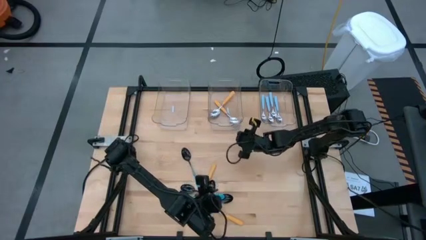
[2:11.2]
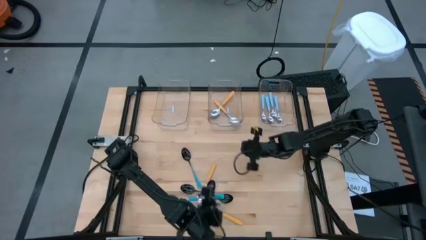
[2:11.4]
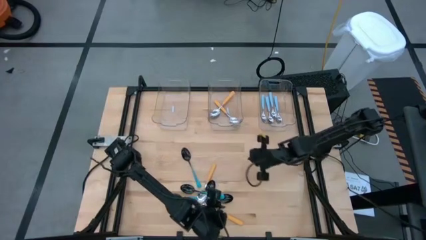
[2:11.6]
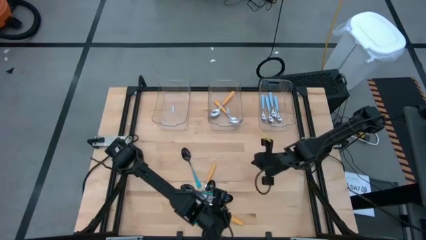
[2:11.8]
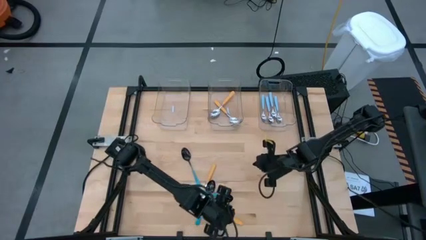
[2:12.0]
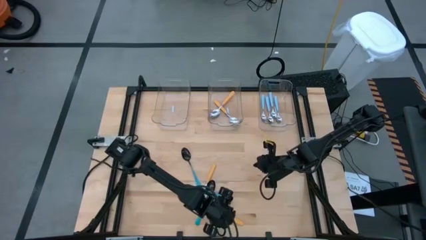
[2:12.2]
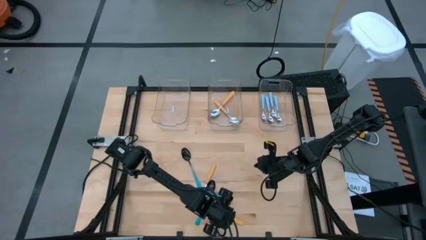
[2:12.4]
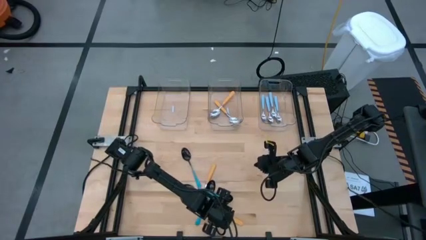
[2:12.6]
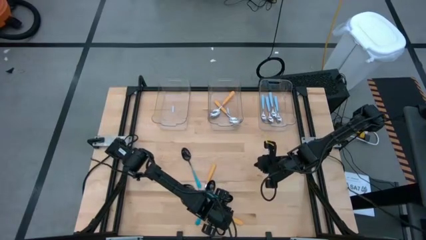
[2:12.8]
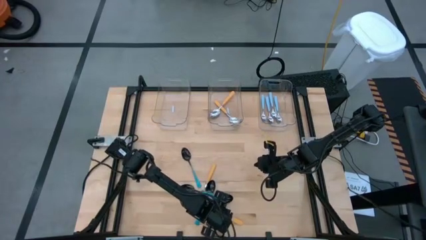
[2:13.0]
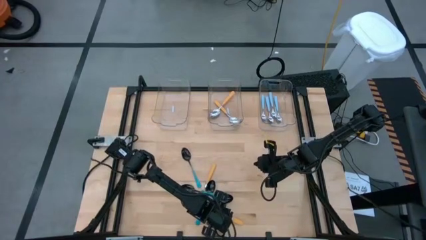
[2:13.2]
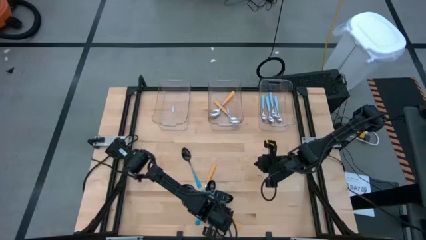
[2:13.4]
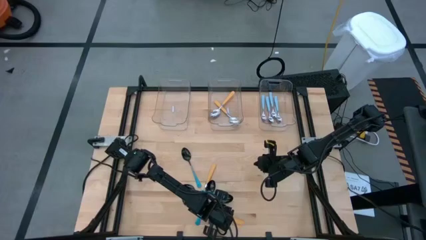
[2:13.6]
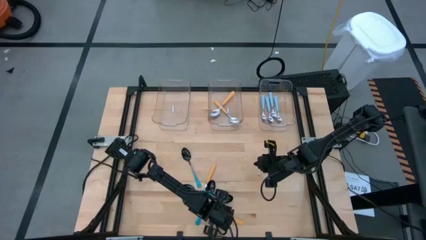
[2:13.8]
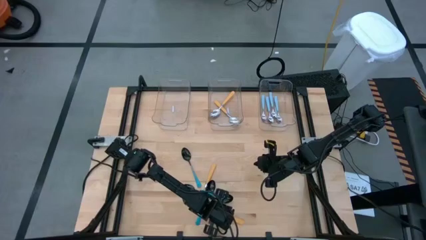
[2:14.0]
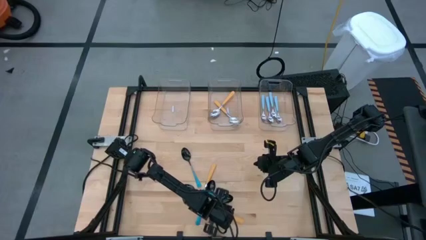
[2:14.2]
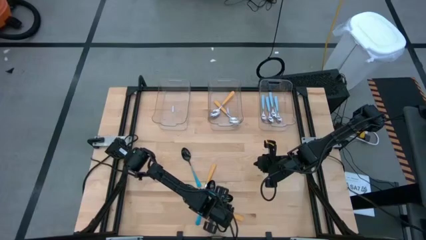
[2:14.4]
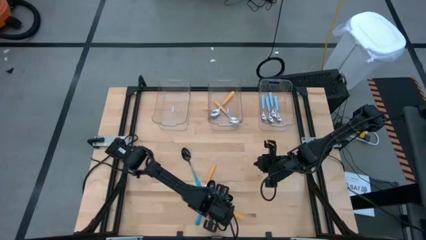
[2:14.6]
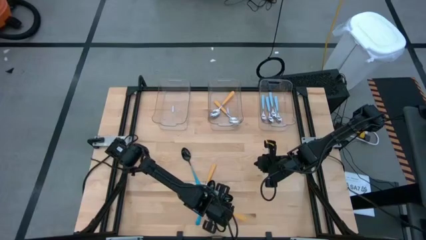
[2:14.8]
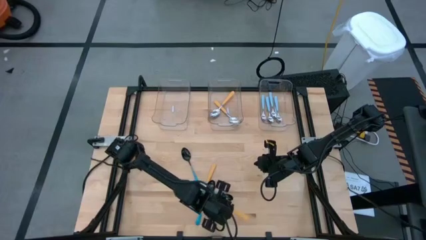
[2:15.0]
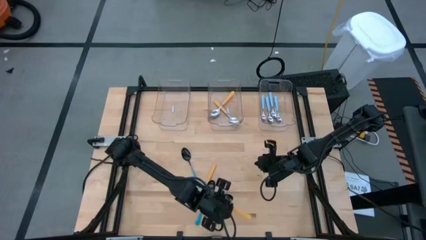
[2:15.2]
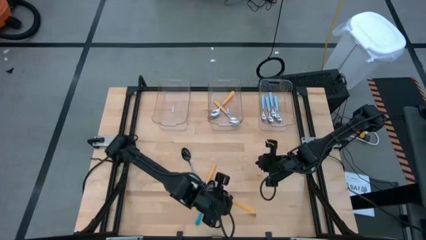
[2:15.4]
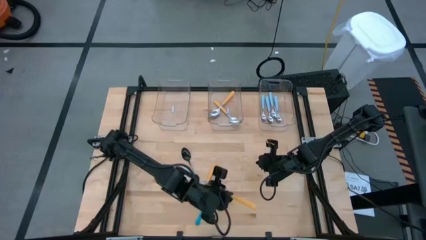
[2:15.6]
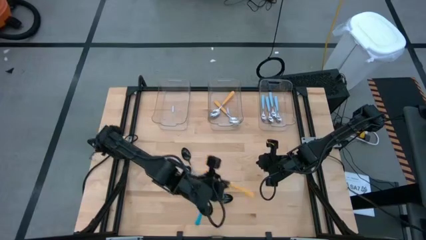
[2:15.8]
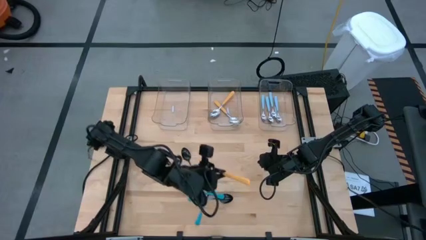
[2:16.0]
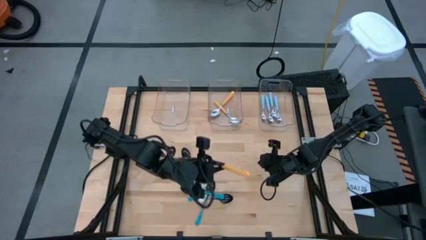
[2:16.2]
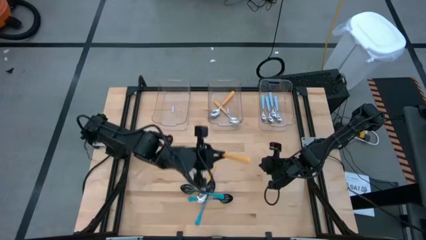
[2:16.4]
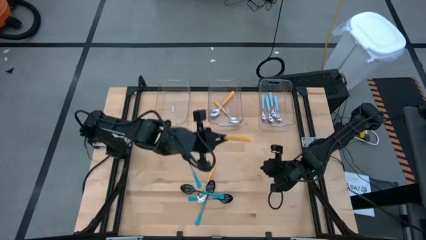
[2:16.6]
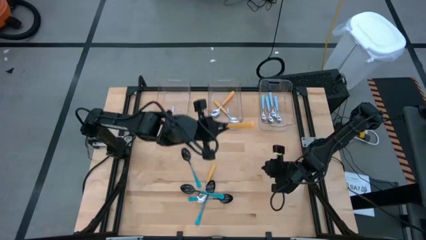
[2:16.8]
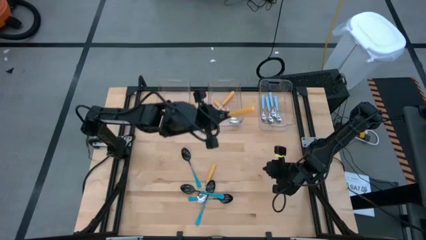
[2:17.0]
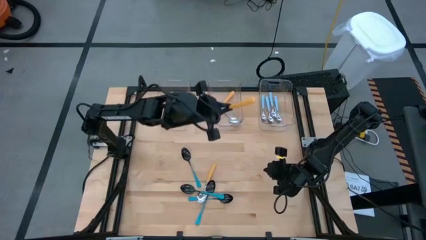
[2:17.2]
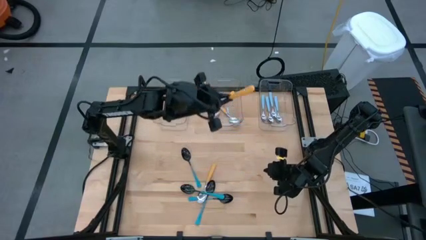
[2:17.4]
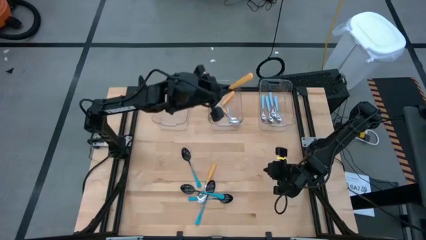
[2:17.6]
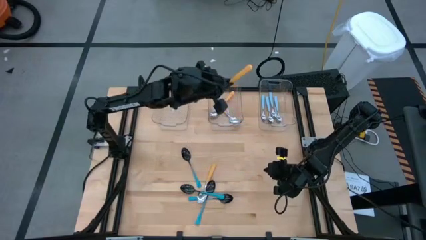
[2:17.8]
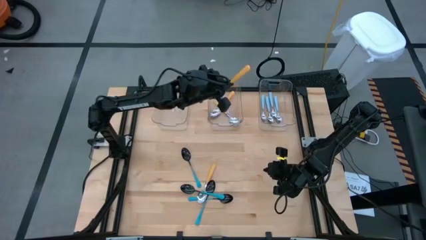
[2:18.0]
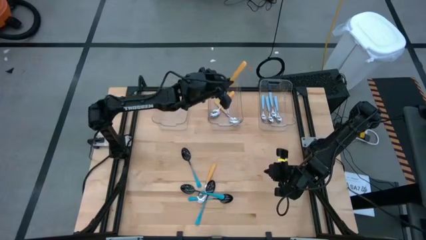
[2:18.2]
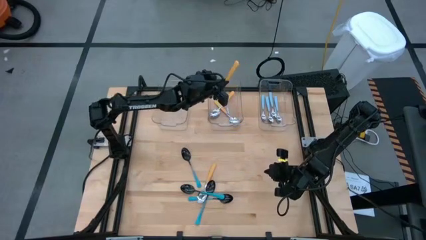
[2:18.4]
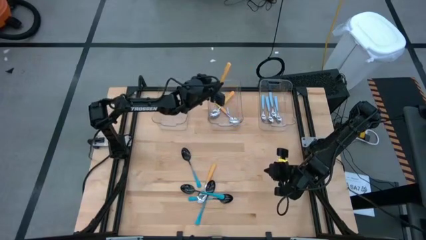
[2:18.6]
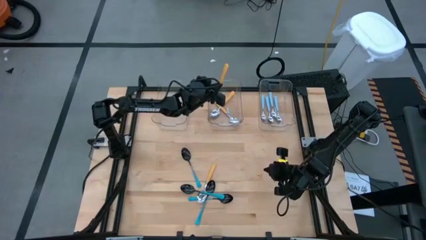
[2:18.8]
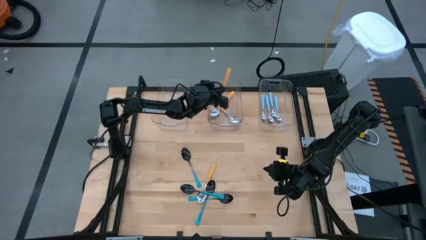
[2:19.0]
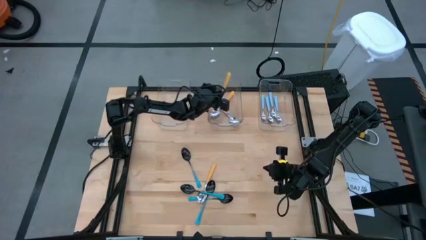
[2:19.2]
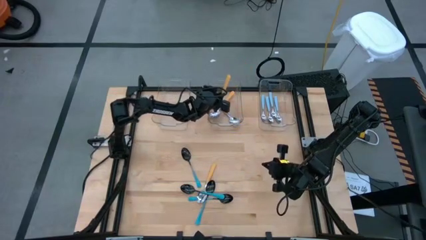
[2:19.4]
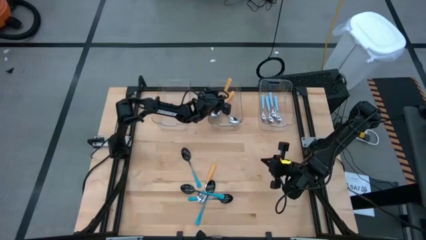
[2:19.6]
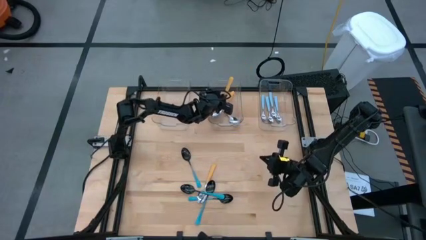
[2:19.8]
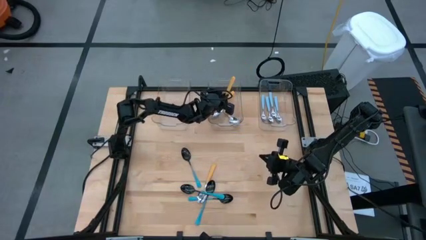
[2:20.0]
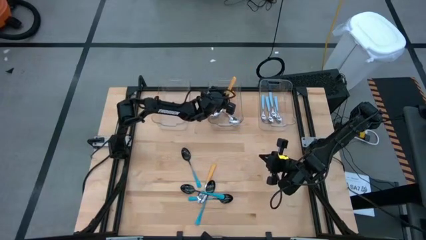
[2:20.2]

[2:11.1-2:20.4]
Task: Sort silverware by color (type)
Put the brown spoon into the middle transparent bin

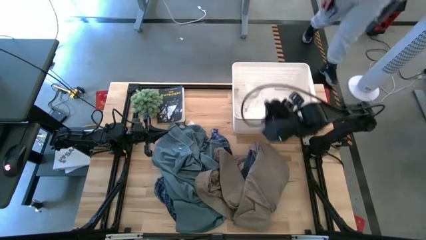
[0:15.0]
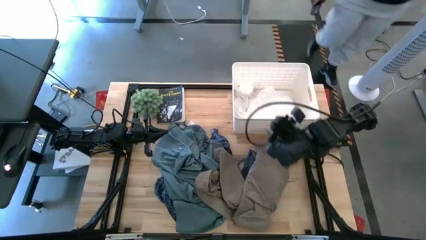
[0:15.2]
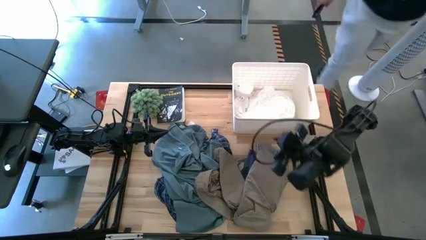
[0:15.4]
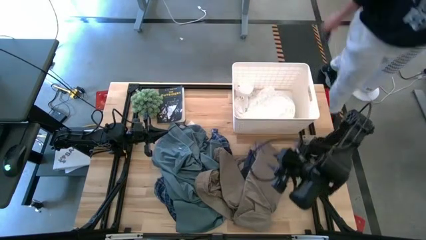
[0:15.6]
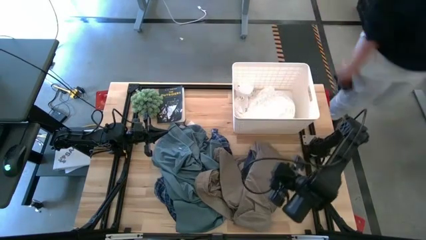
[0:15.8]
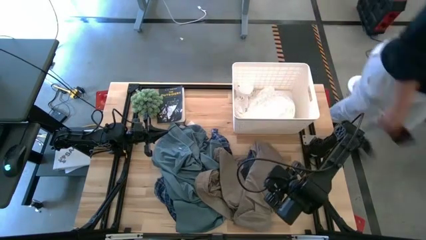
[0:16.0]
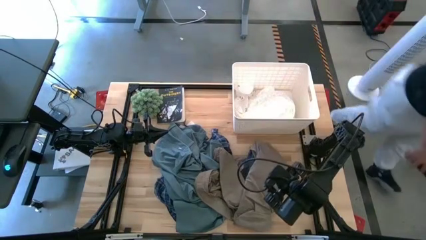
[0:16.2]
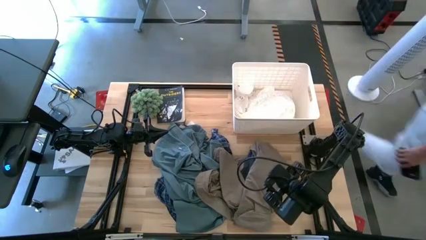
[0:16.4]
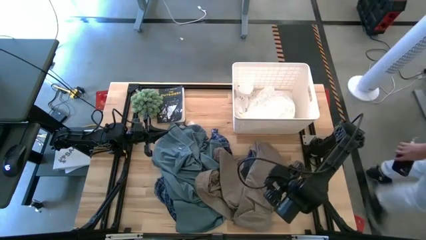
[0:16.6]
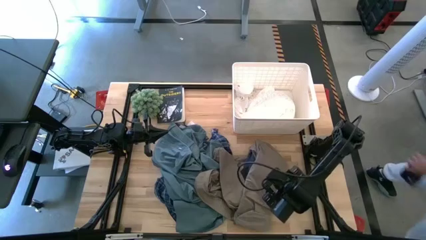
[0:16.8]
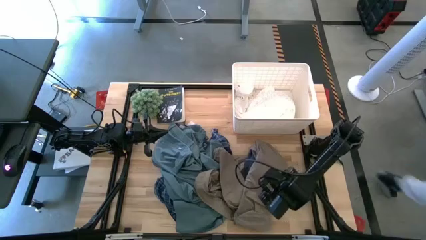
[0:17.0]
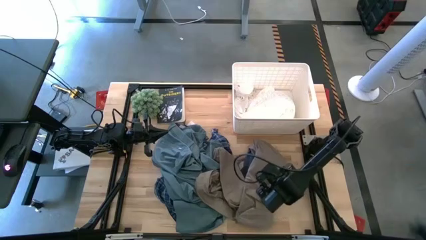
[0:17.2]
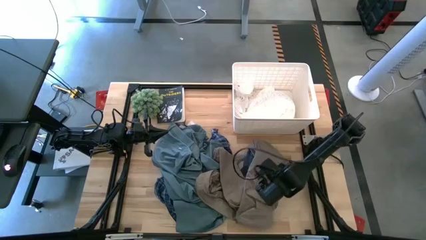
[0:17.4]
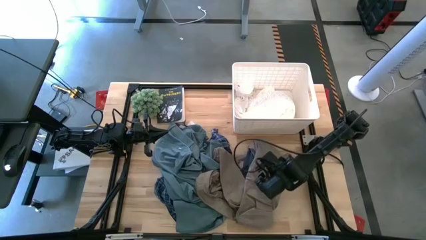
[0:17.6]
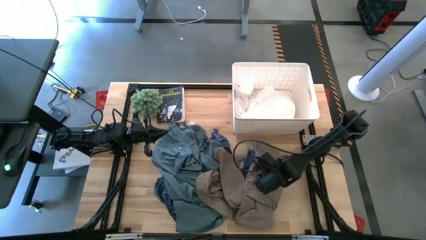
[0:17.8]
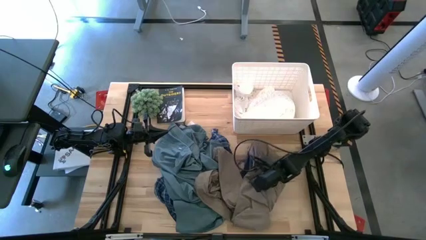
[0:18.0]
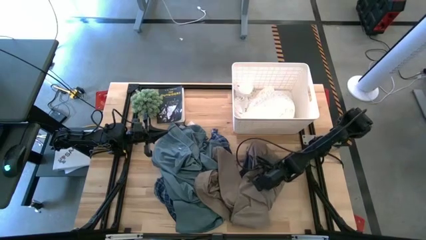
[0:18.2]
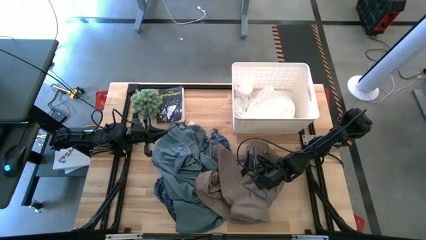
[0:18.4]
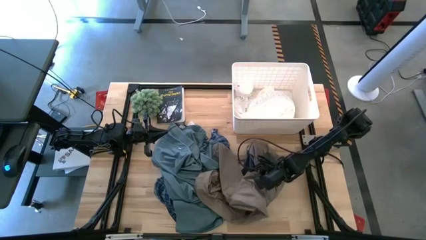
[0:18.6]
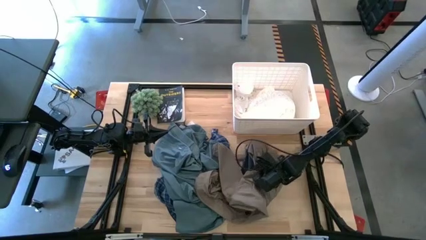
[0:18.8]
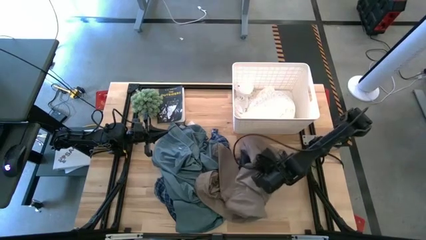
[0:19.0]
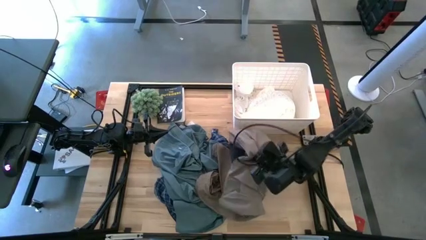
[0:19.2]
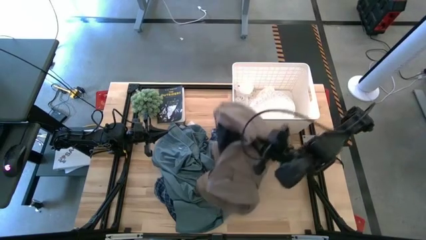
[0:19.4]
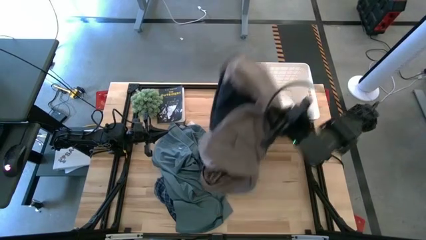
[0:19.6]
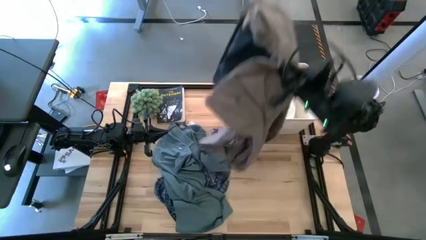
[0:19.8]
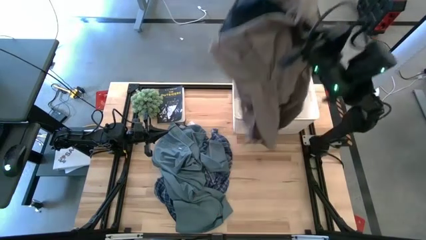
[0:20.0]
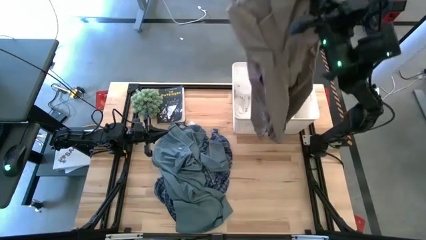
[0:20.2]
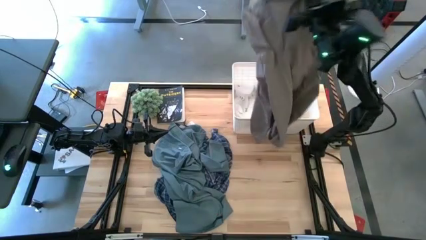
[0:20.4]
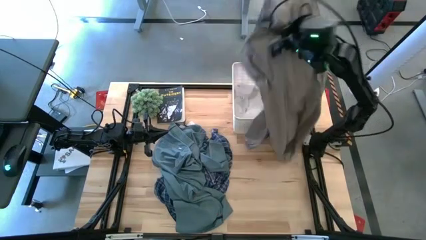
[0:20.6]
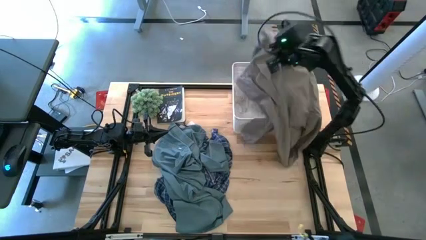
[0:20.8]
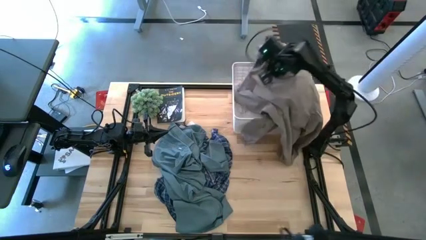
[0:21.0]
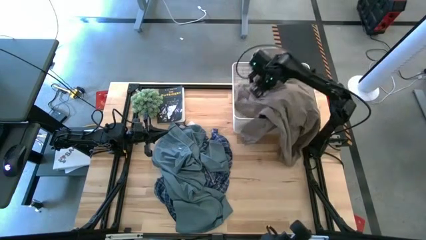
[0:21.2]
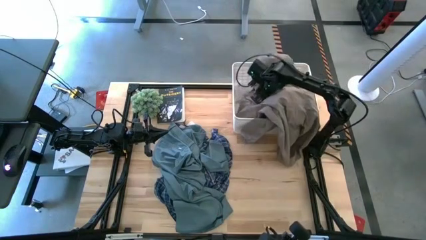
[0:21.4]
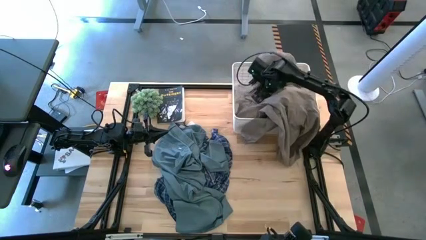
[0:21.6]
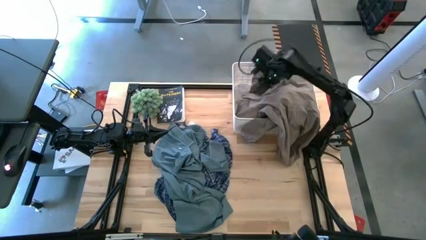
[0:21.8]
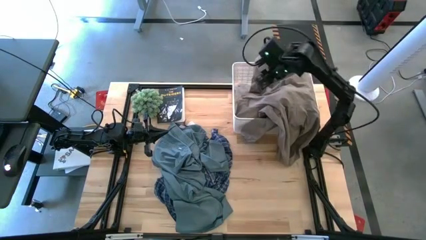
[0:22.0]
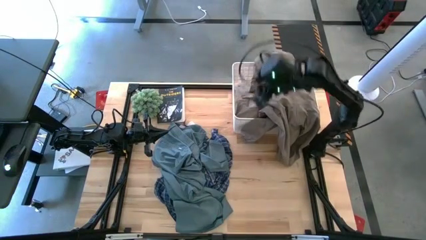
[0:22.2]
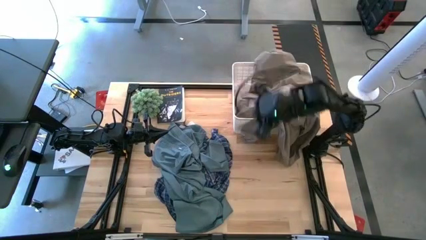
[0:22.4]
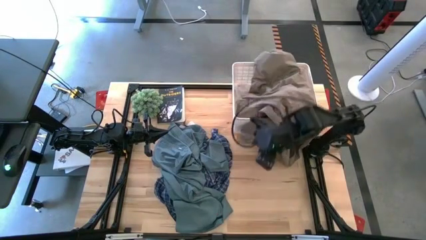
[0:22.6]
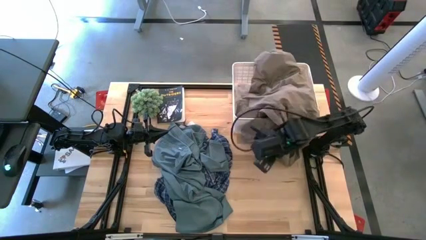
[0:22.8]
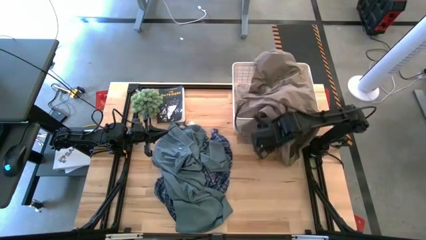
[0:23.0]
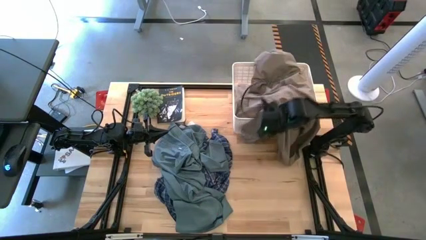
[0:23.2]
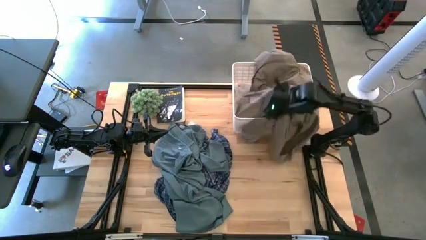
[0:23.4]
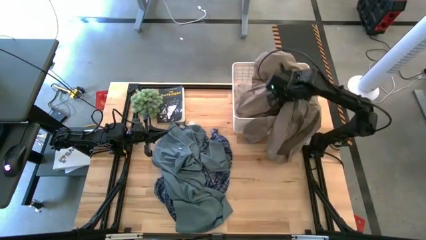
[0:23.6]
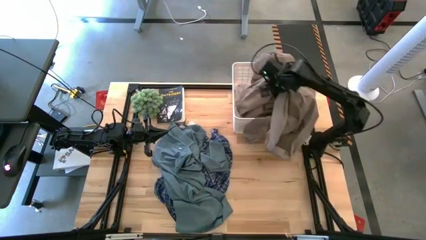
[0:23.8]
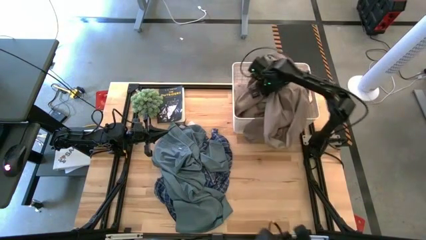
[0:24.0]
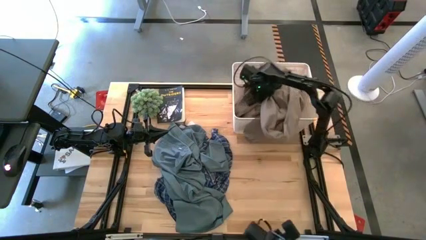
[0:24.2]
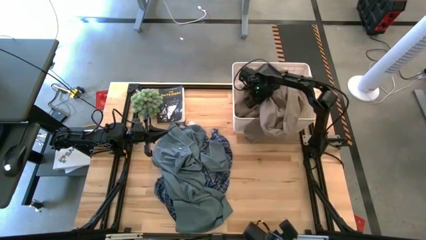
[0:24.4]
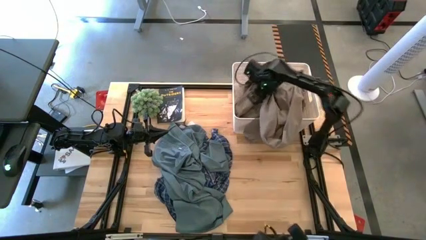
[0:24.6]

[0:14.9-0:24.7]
Task: Sort clothes
Put the brown and blue jacket into the white laundry organizer
